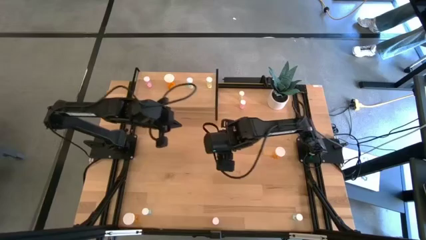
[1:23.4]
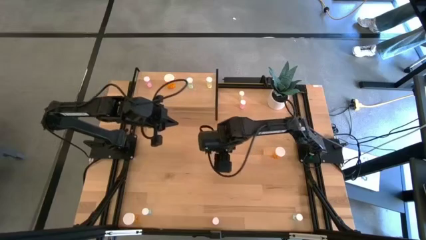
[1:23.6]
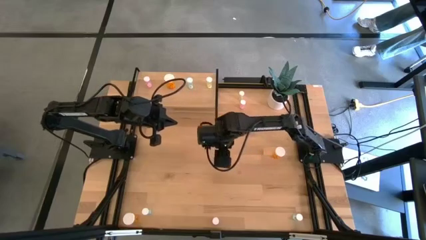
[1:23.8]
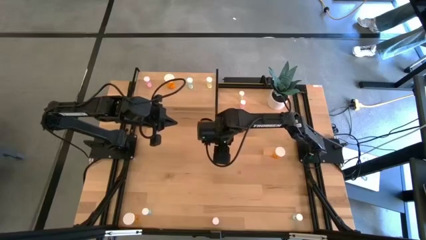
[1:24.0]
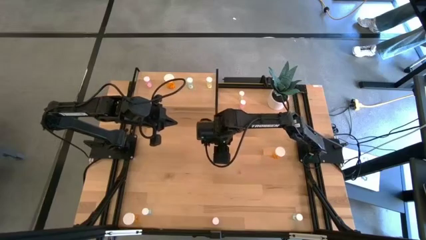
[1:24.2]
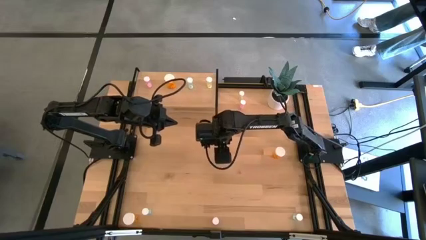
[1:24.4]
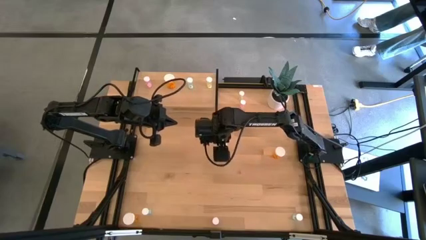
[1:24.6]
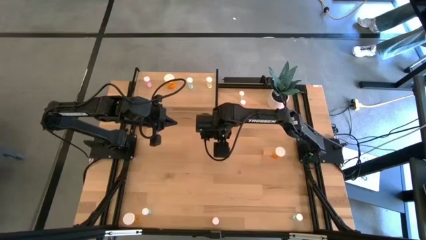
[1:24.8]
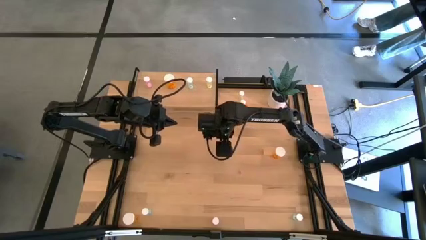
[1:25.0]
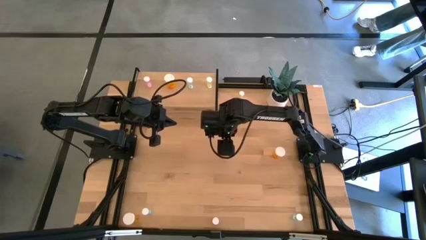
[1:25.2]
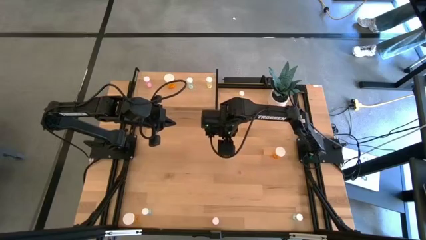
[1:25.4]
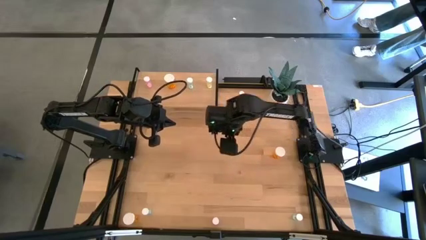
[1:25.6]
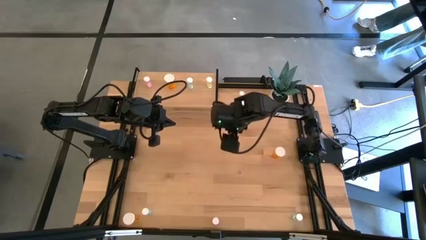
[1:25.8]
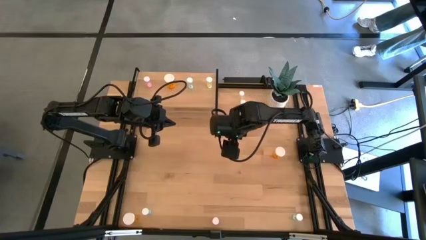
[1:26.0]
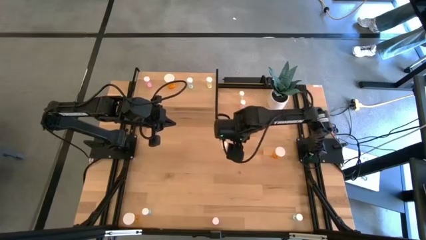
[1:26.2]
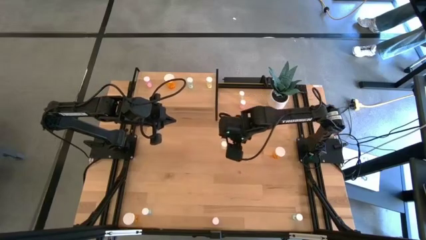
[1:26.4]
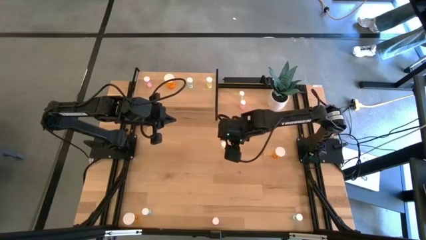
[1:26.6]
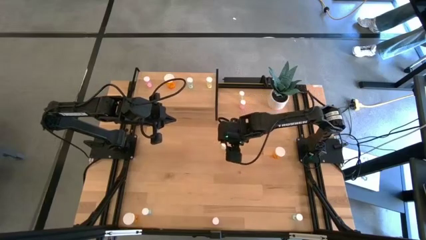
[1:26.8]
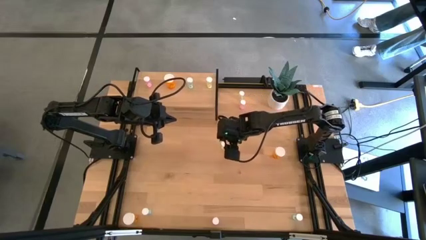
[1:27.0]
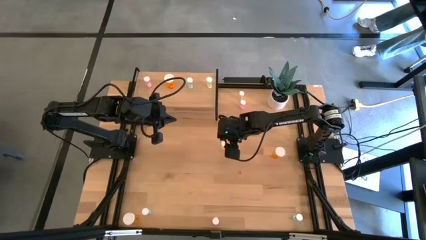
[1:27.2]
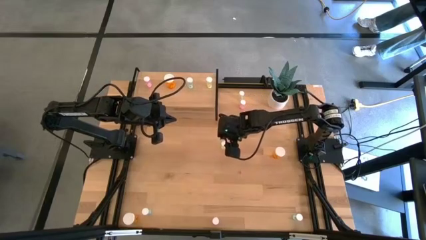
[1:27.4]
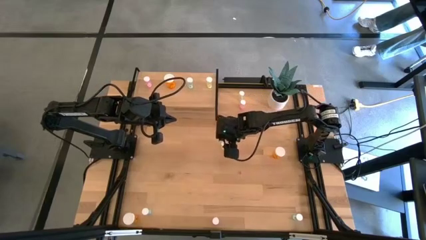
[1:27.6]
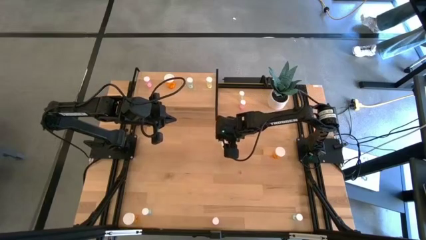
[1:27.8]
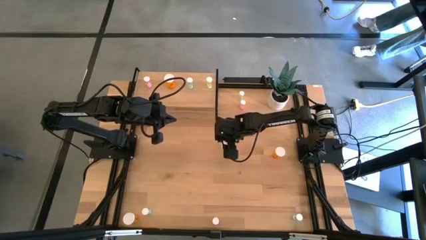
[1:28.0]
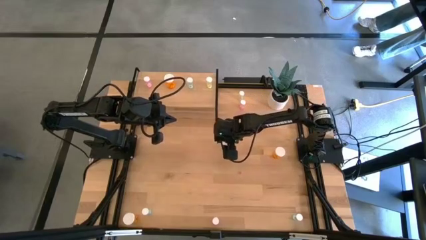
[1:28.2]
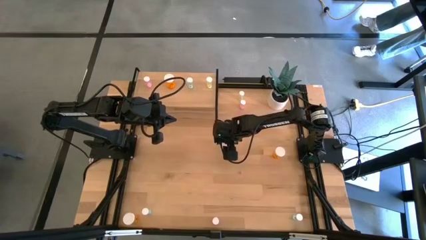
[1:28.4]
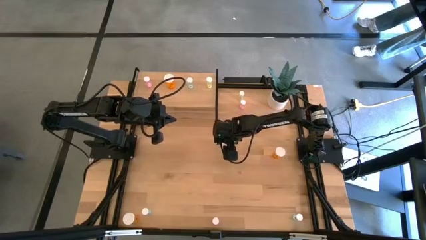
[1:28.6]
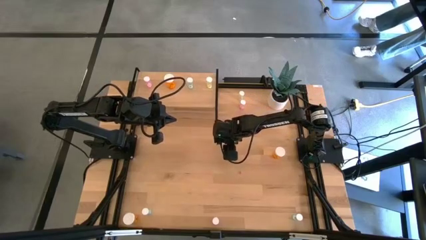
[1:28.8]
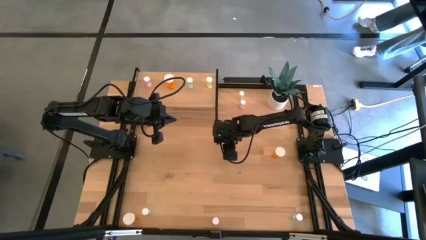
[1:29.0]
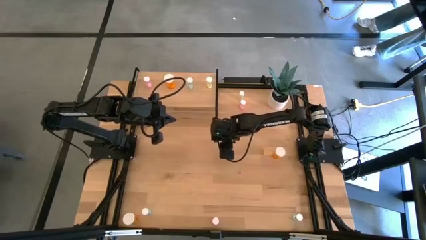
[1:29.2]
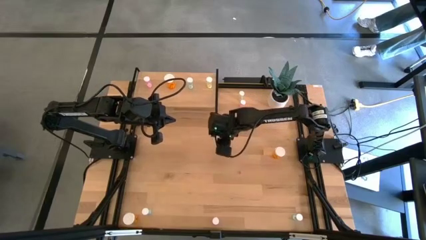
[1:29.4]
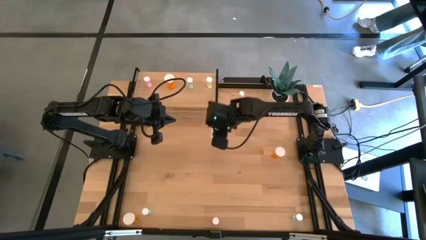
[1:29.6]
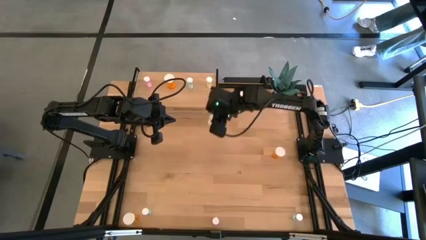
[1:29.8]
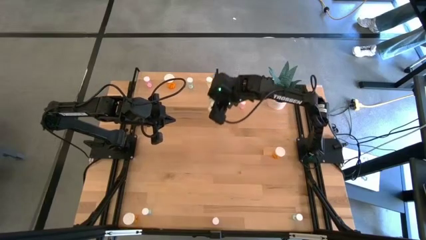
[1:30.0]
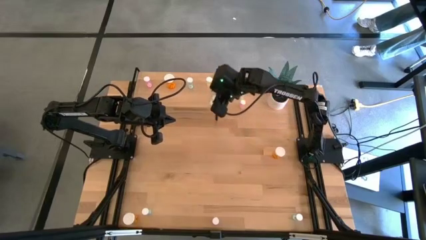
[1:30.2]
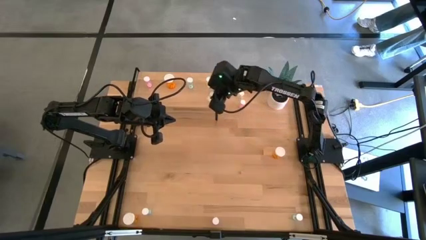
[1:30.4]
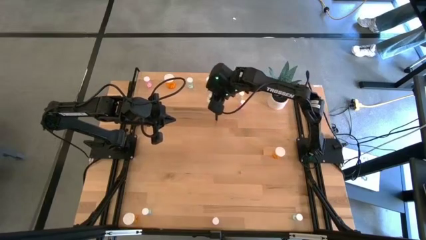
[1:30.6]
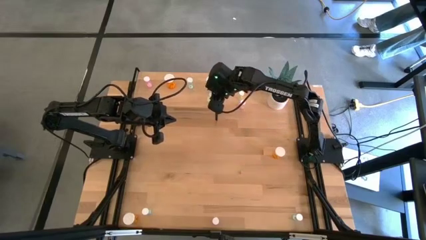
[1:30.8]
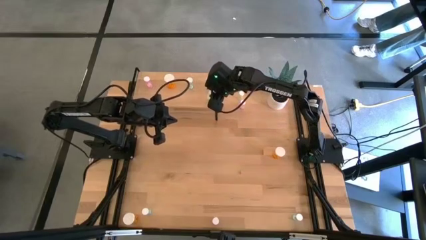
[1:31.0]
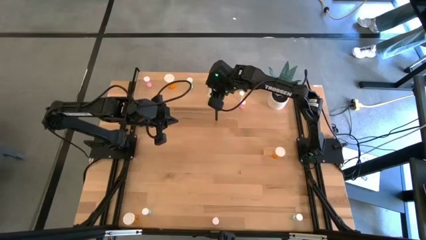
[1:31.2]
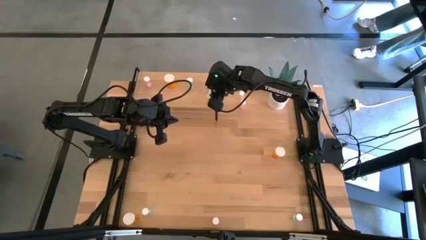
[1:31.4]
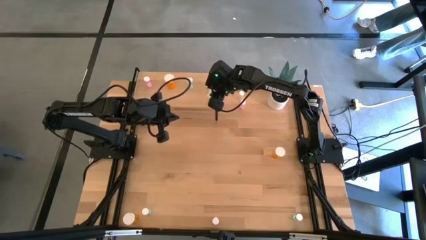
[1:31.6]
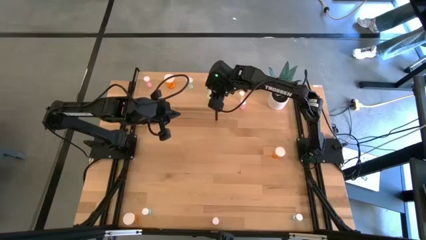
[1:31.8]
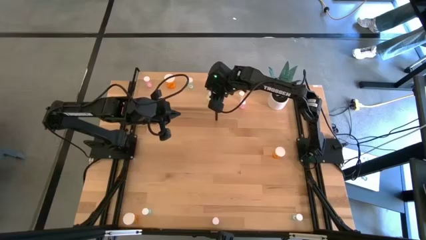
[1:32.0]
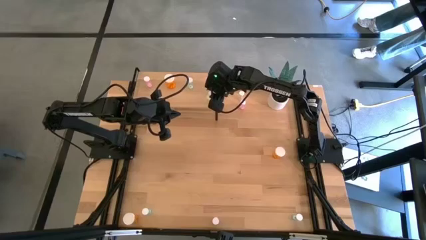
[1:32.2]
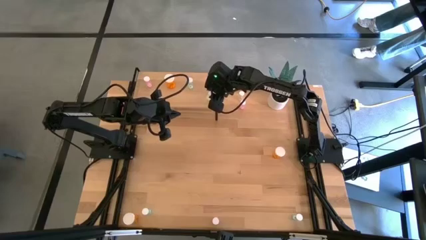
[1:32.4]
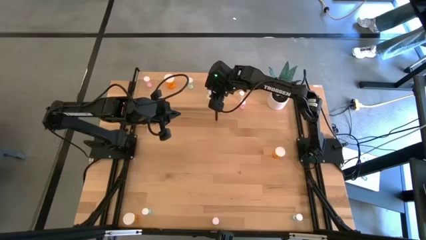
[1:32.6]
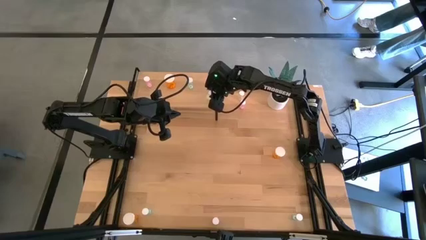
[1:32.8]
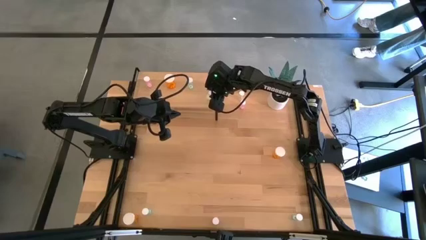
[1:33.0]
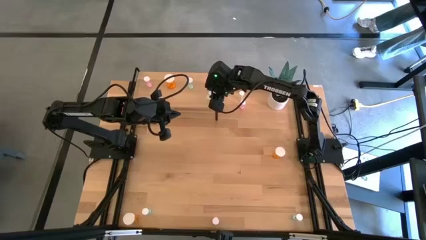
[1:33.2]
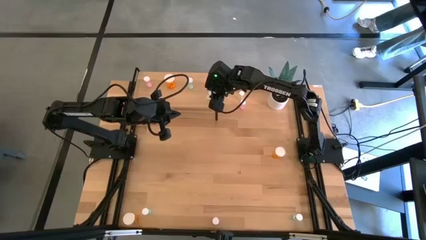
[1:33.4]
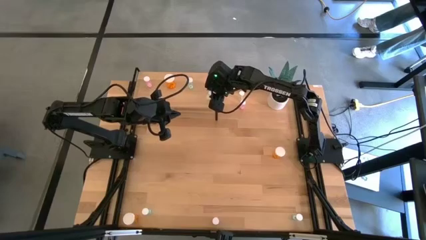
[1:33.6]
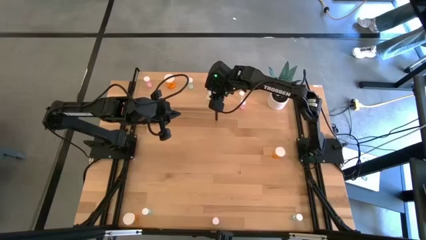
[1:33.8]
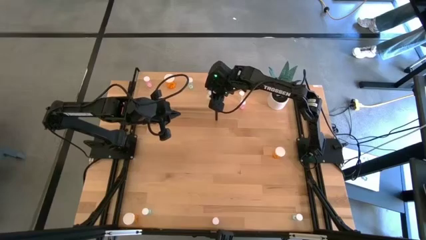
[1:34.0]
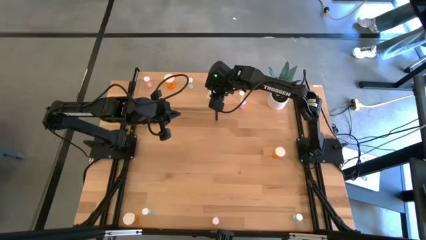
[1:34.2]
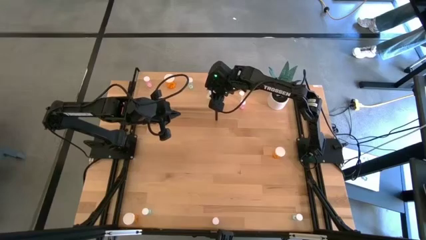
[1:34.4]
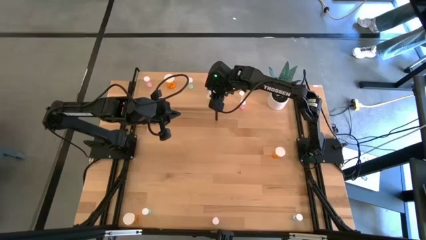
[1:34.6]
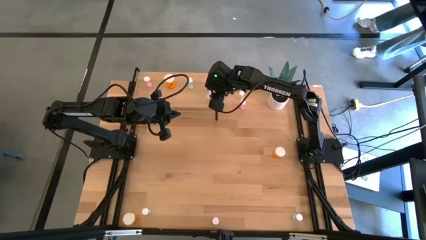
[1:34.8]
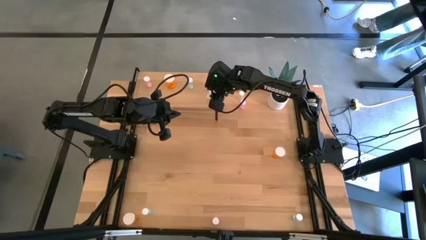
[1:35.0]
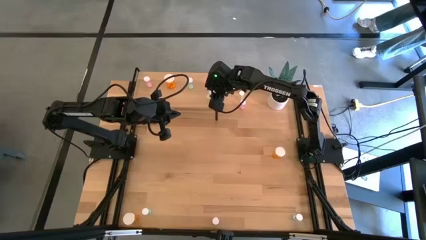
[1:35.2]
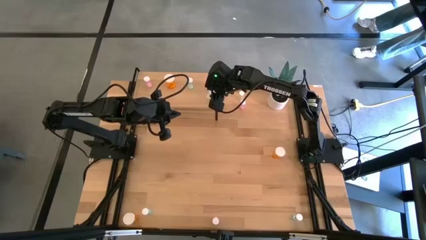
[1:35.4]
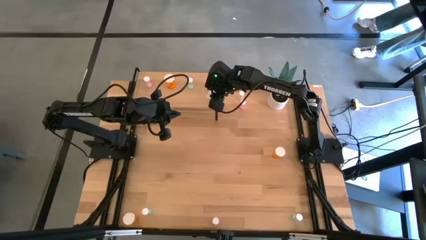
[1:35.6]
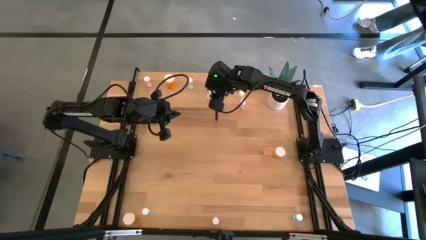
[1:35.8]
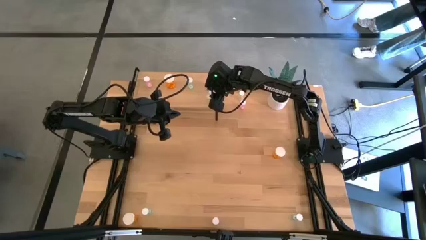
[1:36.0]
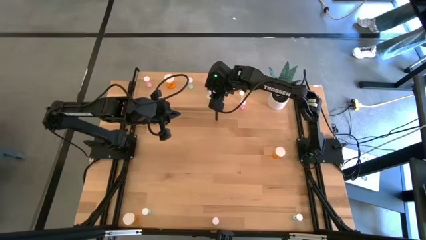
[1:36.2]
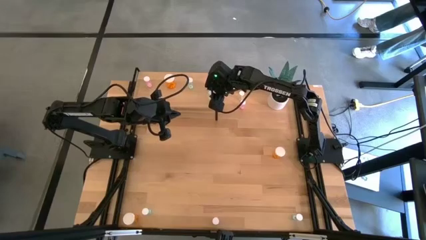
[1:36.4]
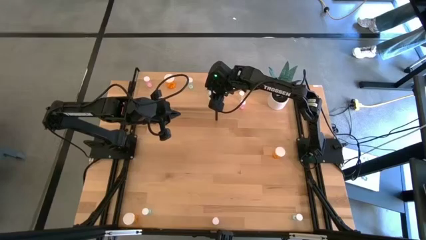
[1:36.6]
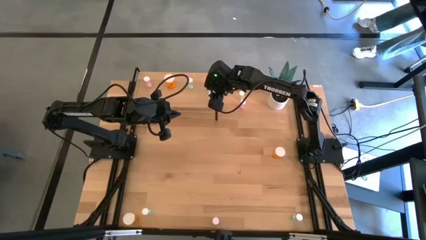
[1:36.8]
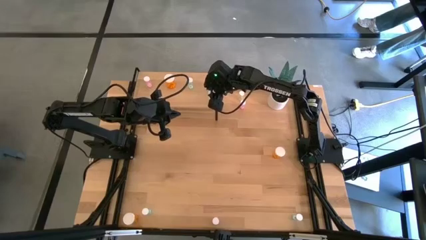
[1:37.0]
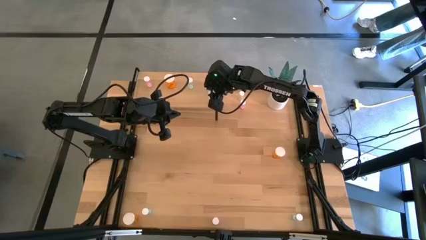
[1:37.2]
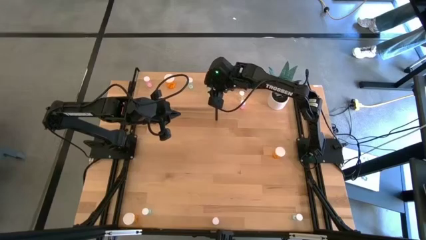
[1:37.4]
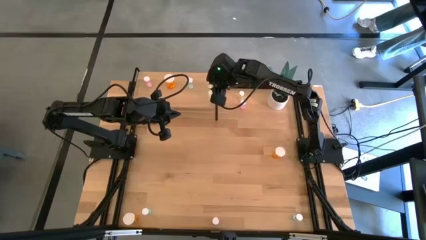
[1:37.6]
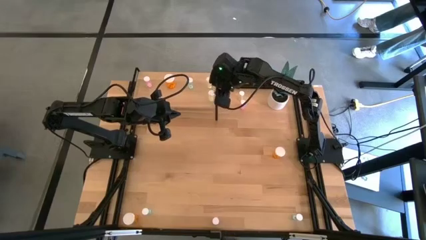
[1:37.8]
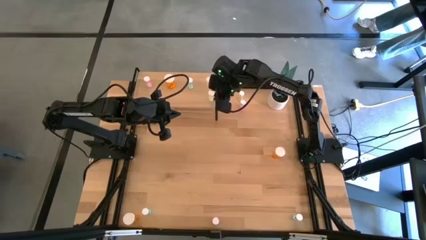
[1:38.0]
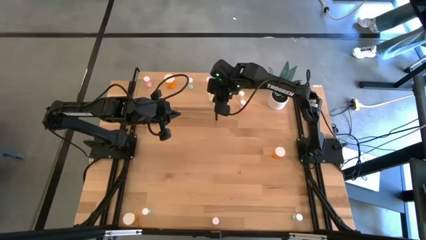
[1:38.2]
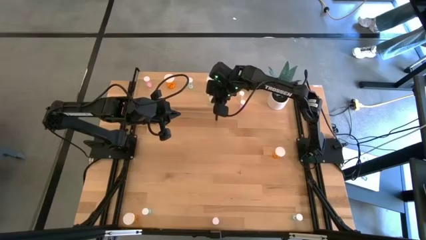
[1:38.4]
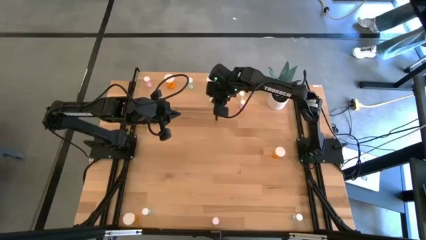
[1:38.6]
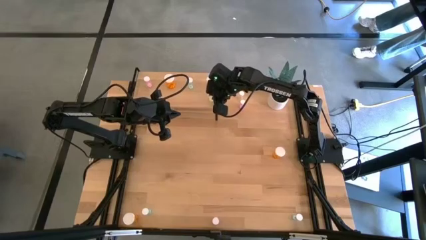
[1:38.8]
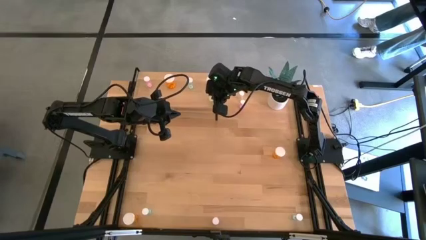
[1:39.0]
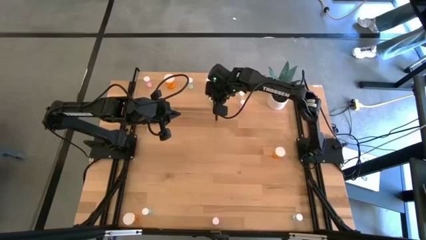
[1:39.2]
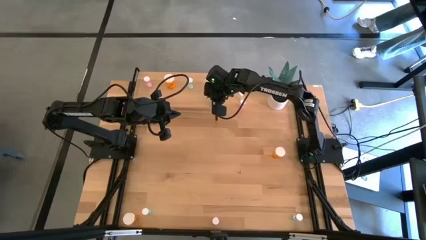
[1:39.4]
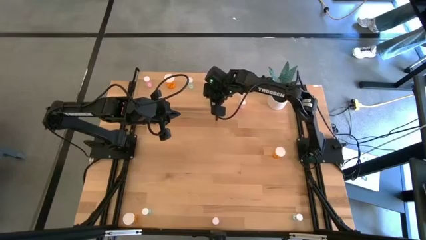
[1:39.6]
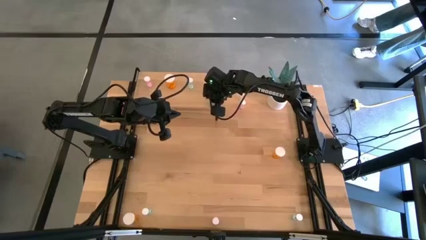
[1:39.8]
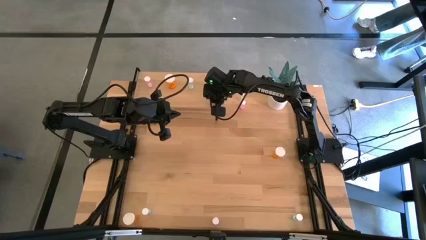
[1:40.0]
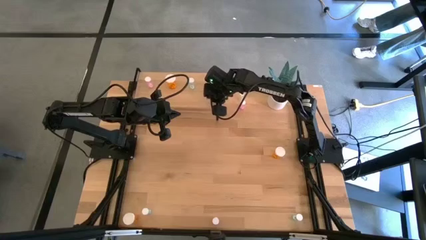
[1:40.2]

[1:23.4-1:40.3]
Task: Pick and place medicine bottles onto shelf by color
Put the bottom yellow pill bottle on the shelf aligned with the other yellow pill bottle
